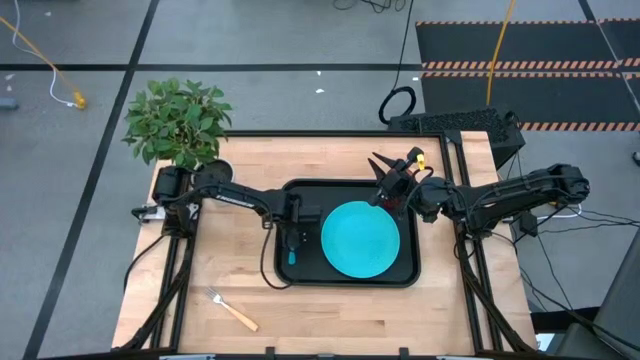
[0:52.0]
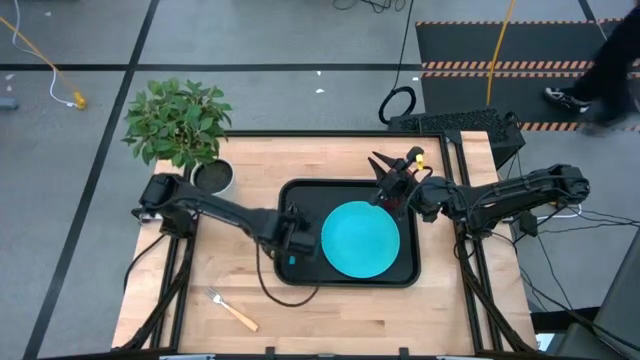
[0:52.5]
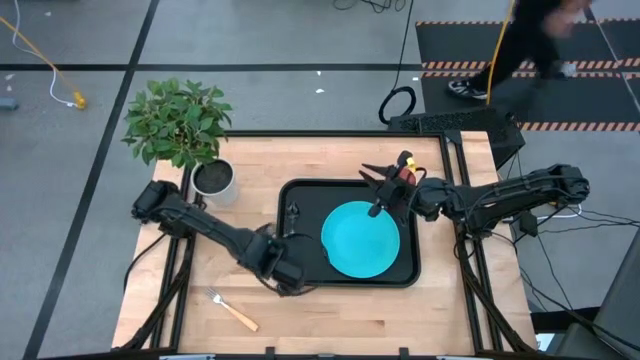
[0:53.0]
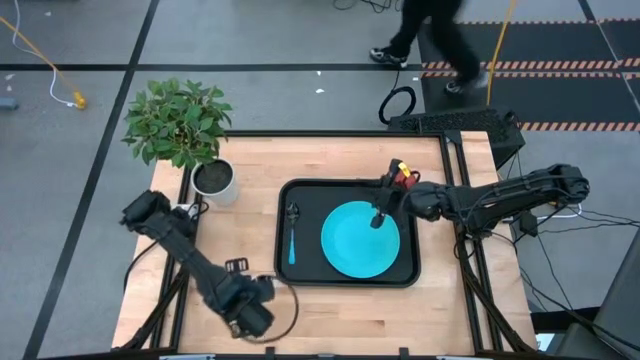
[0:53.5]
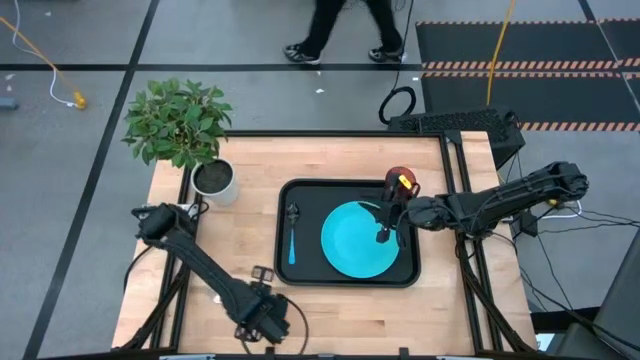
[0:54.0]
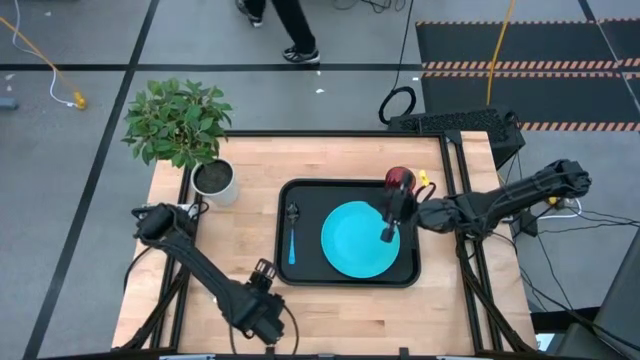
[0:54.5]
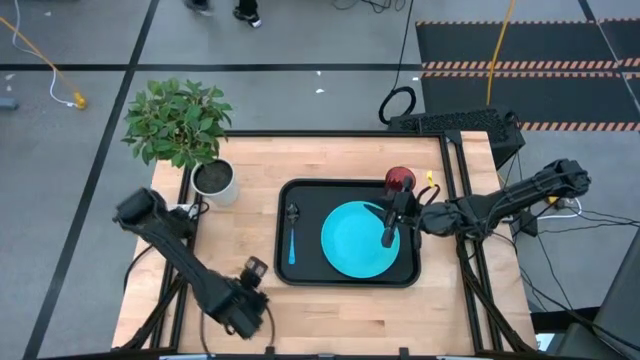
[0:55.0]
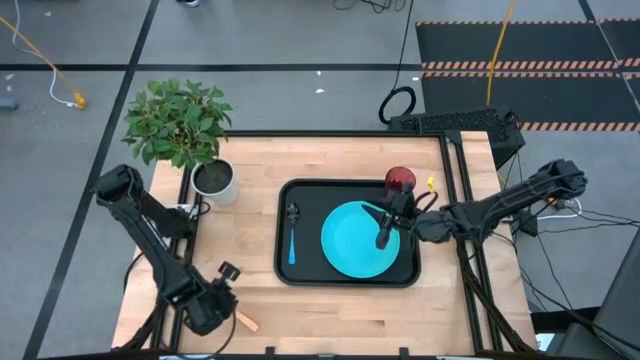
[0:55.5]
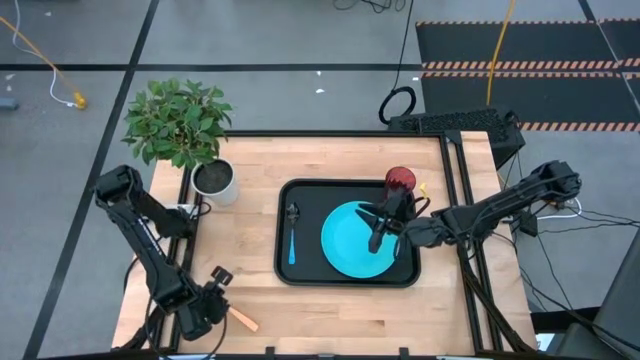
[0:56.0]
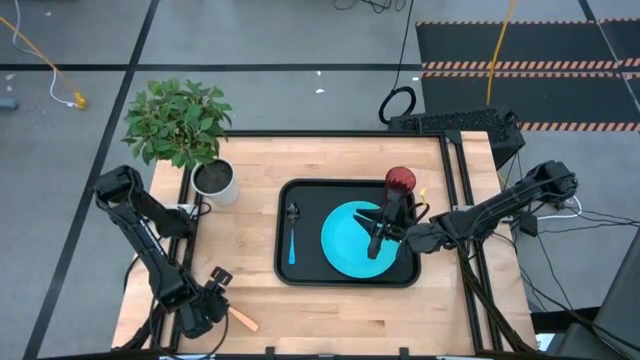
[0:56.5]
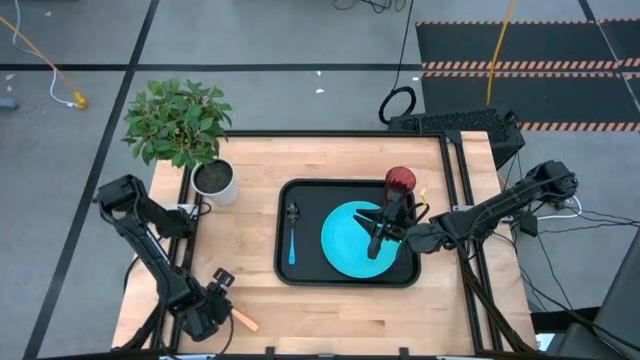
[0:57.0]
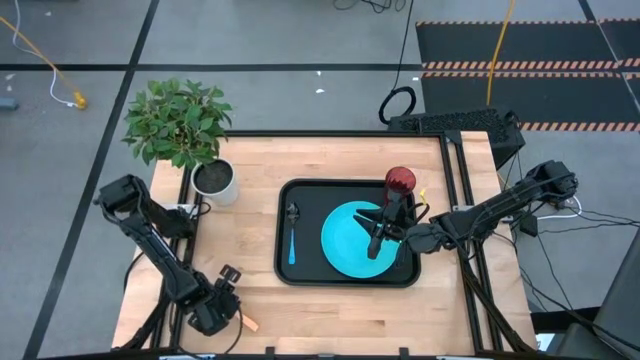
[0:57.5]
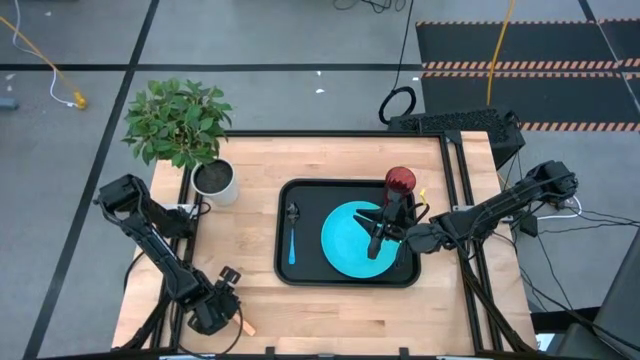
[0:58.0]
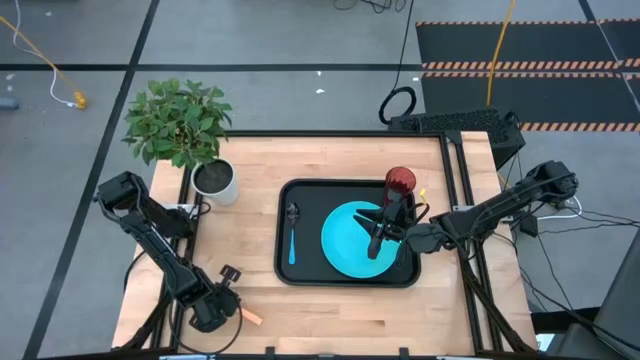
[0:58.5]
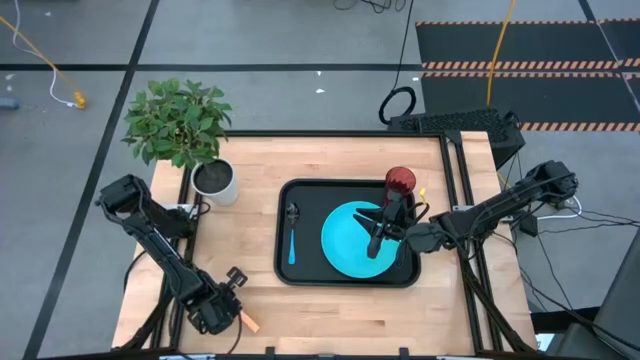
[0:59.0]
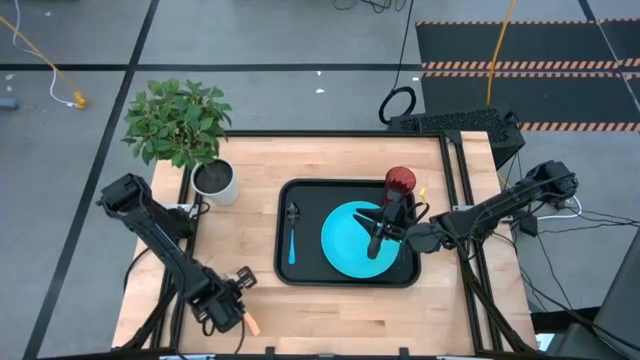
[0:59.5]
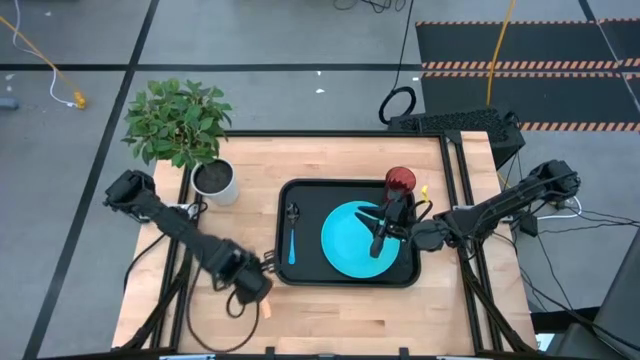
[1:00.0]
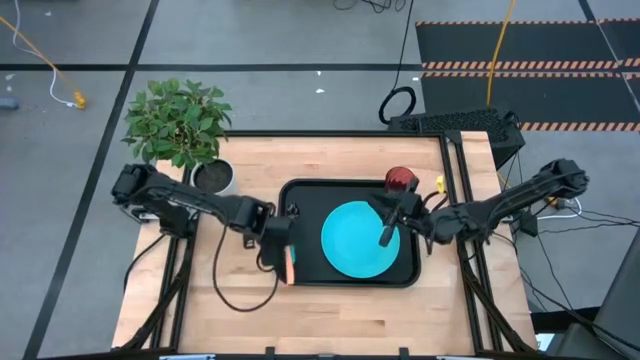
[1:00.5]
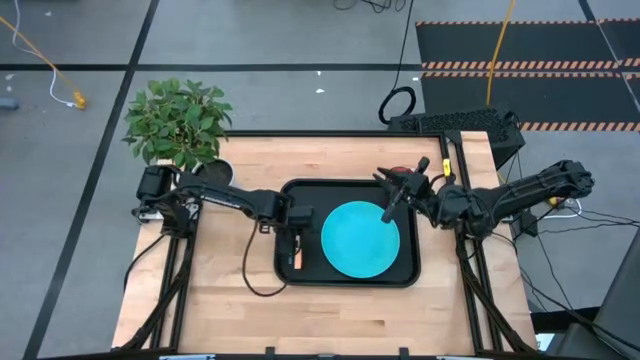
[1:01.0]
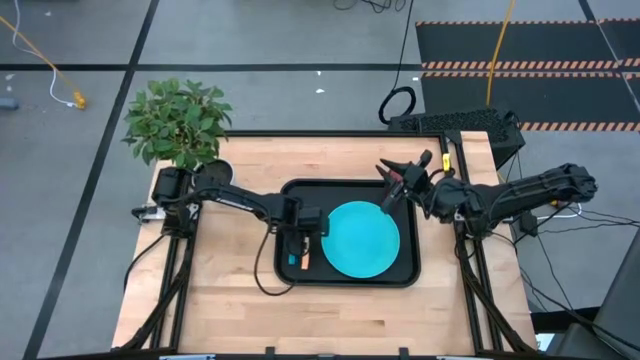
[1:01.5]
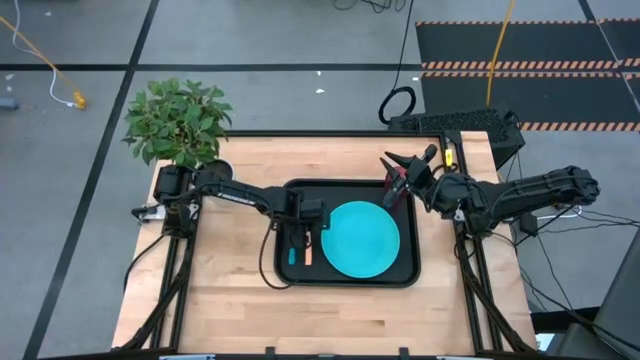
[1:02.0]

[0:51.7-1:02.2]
Task: Pick and place plate/cup/fork/spoon on tray
Put the brown fork on the black serving tray to the right of the blue spoon

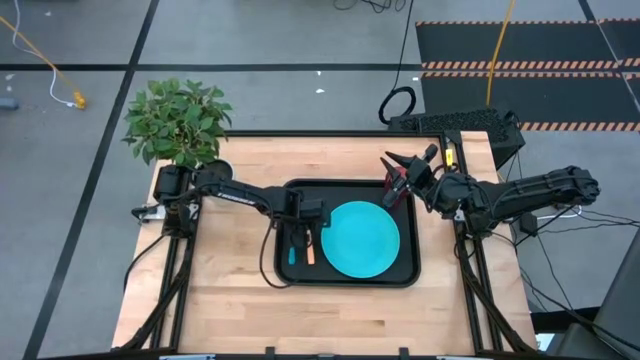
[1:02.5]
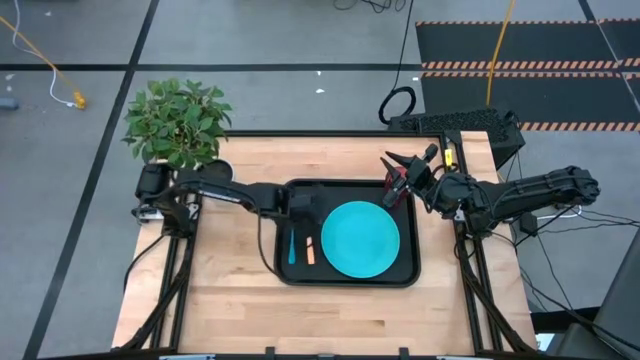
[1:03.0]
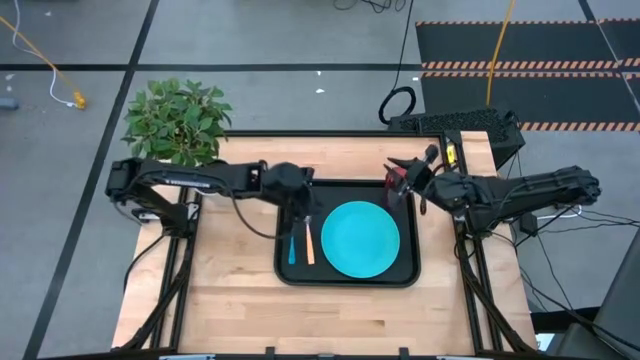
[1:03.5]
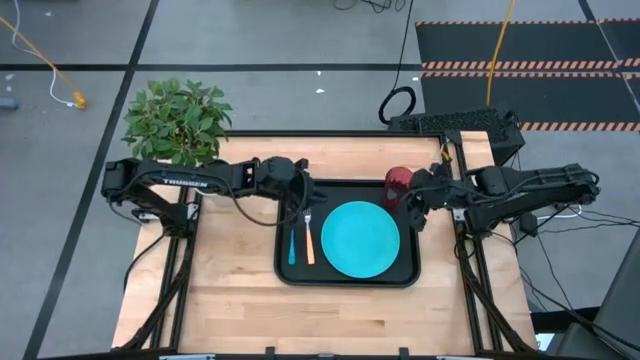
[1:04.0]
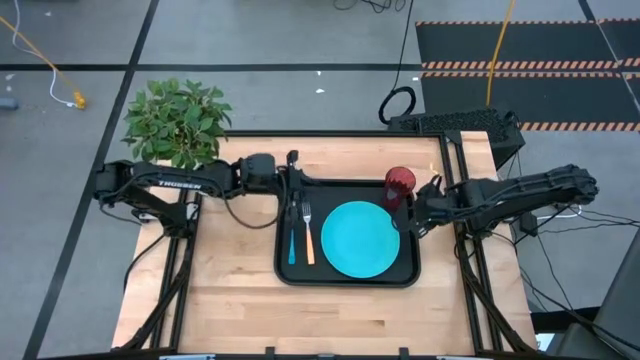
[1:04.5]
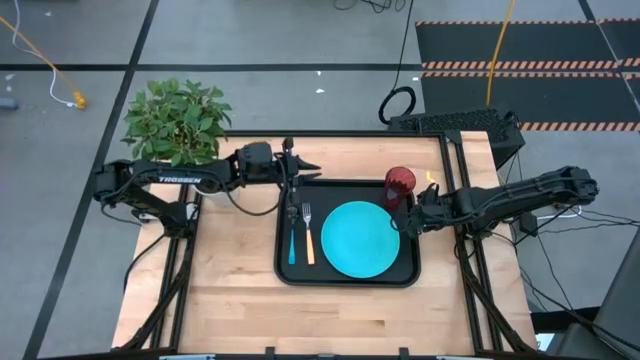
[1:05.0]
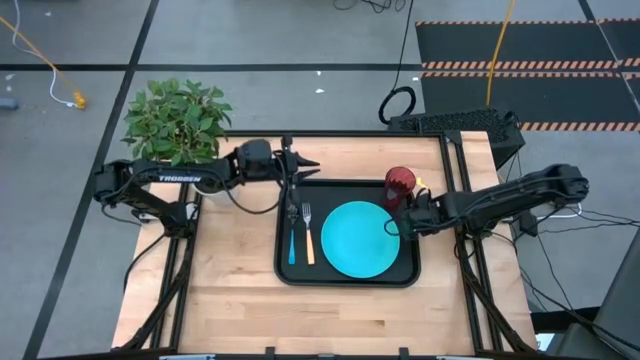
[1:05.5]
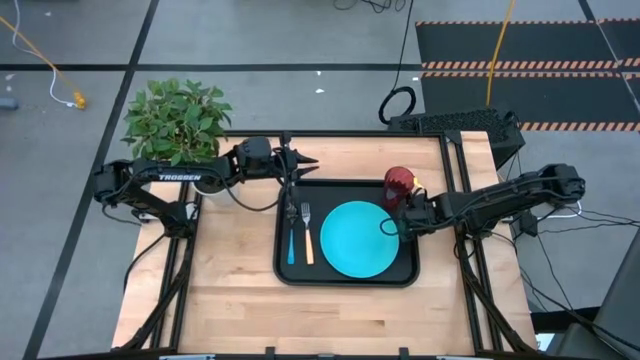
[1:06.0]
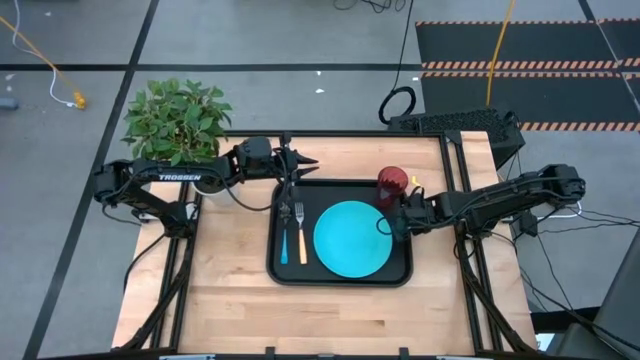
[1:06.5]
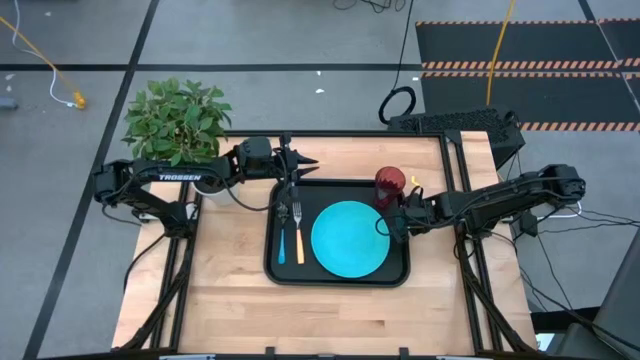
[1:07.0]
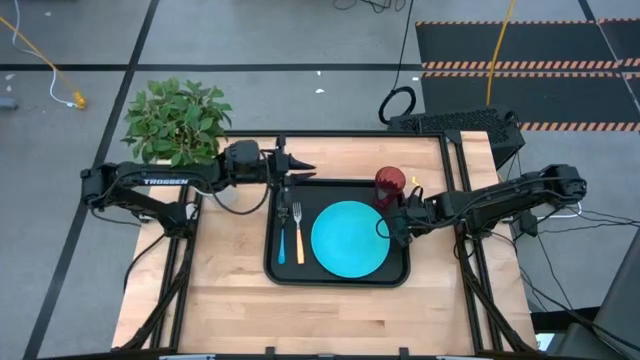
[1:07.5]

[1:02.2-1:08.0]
Adjust the black serving tray

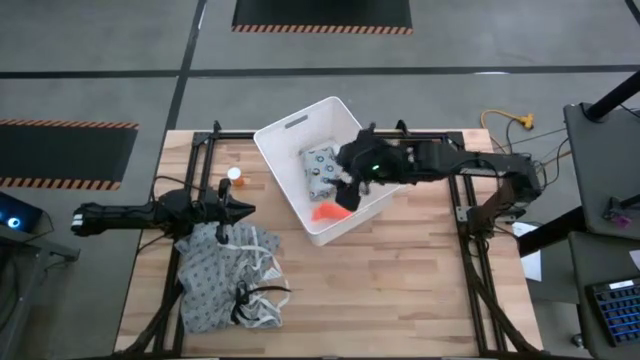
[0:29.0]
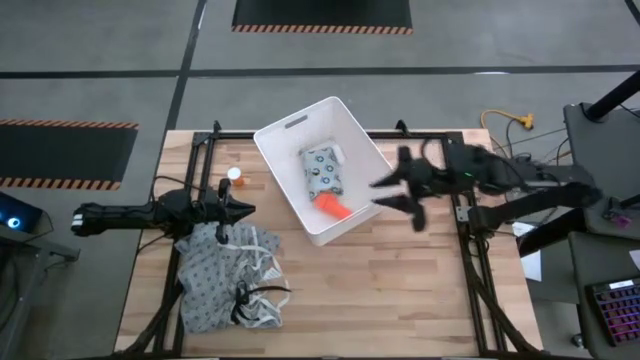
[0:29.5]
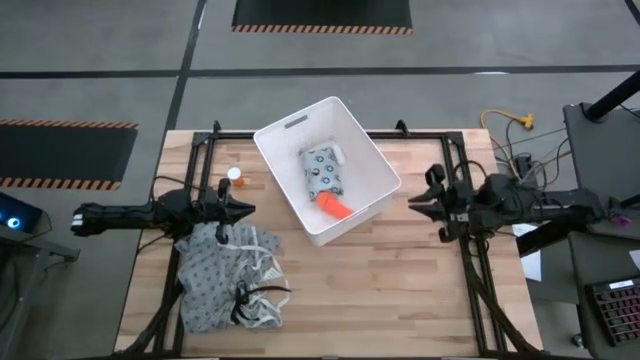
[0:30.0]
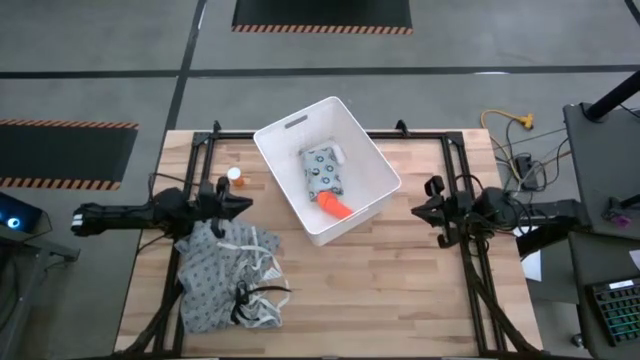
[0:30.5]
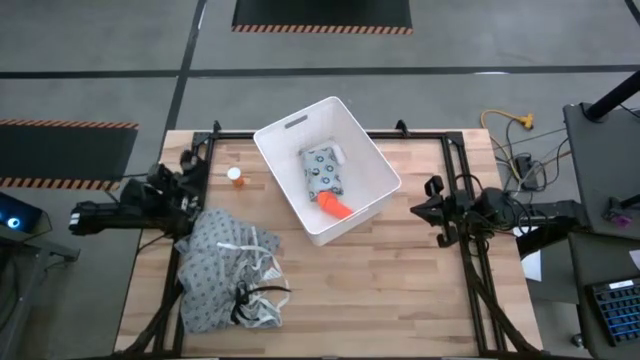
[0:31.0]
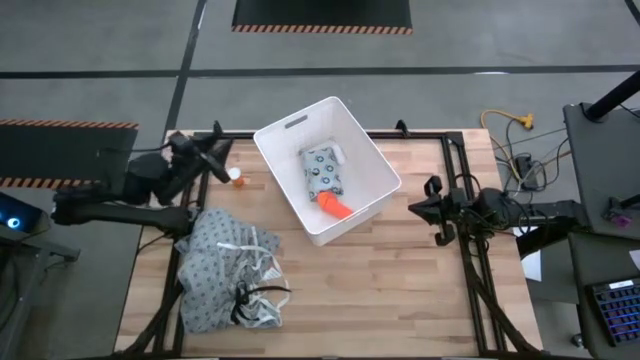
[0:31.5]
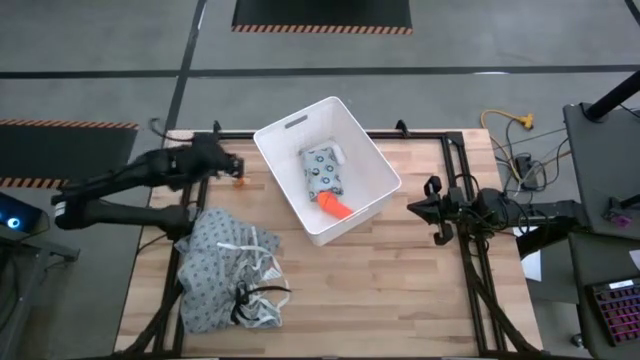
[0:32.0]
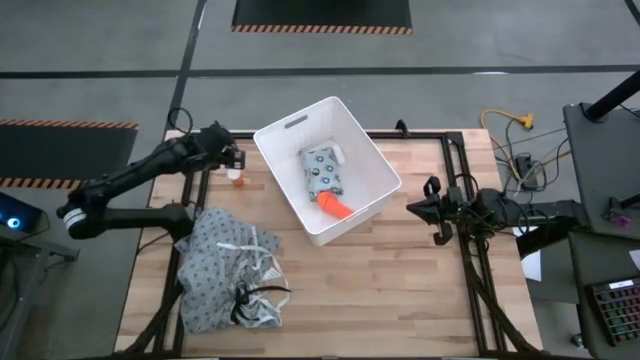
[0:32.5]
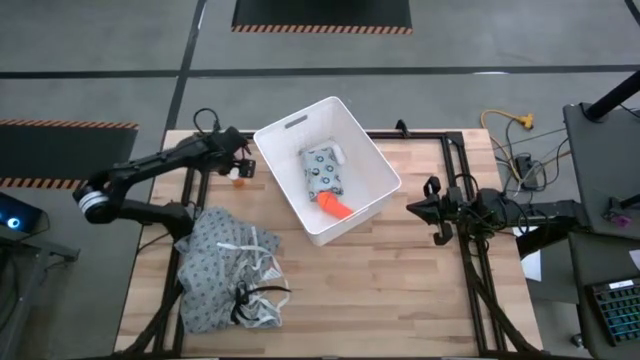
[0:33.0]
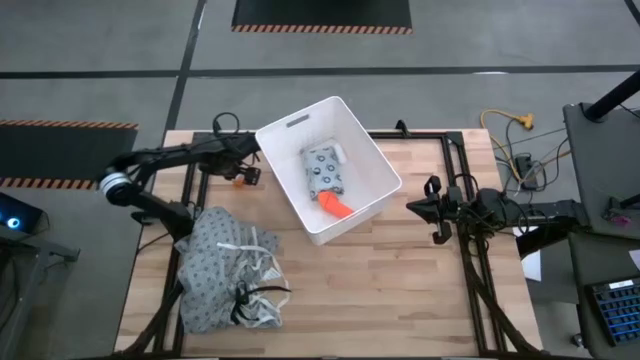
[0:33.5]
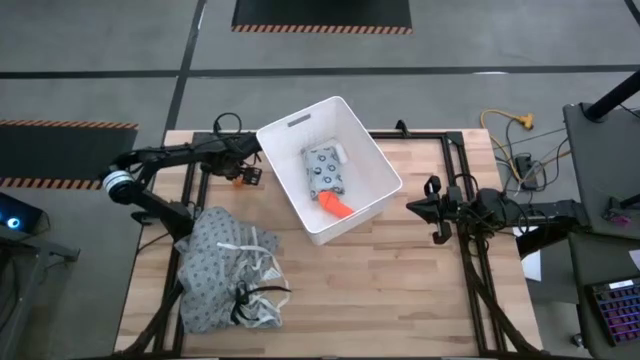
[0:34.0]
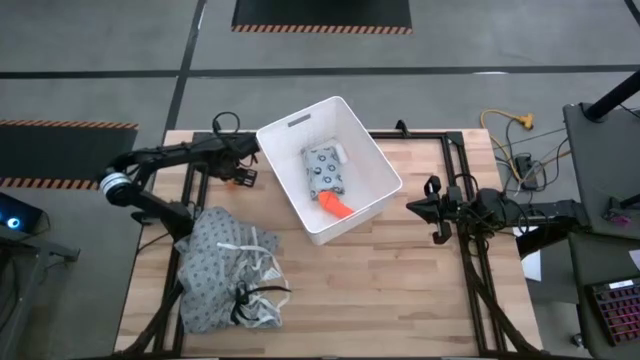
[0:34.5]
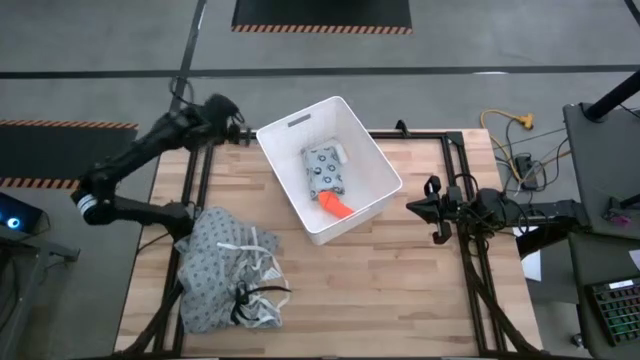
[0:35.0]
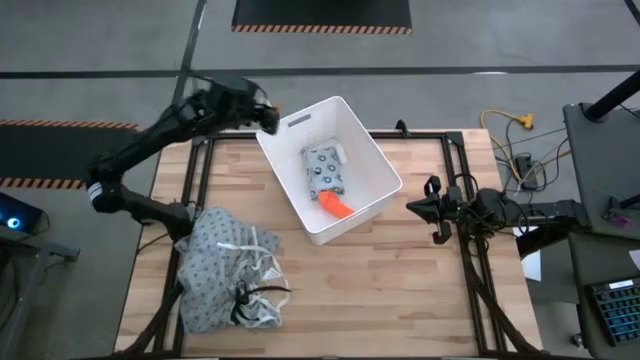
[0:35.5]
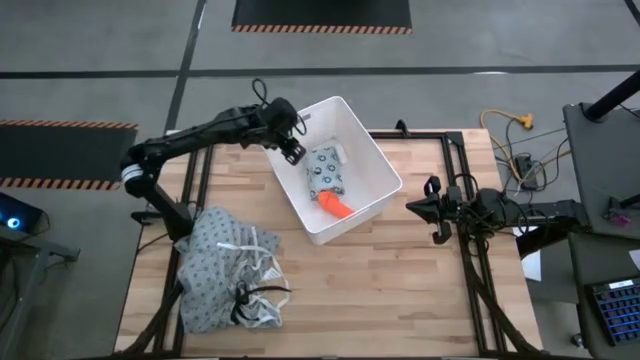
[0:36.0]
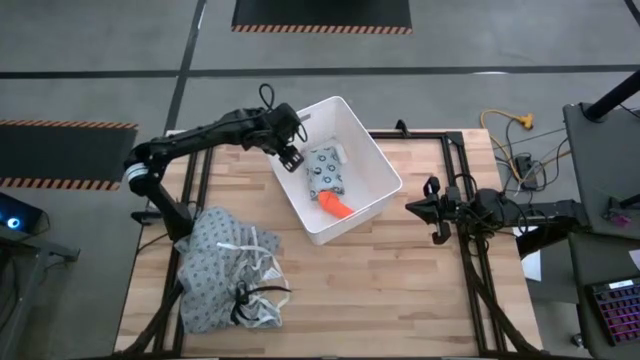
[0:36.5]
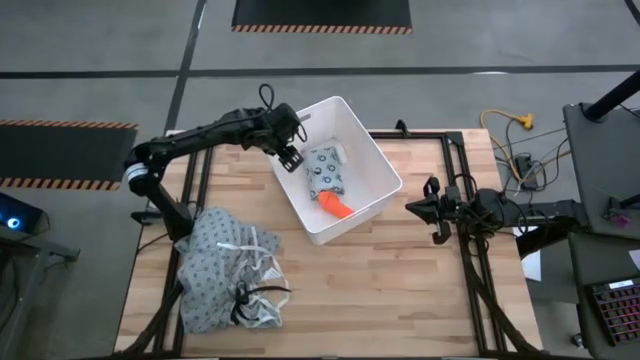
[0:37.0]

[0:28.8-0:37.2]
Task: Pick & place medical supplies in basket/bin
Put the orange pill bottle into the white bin
